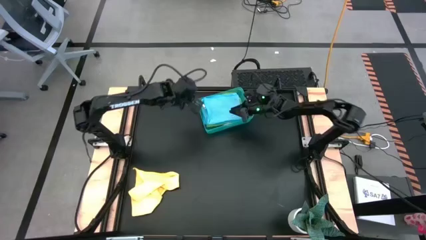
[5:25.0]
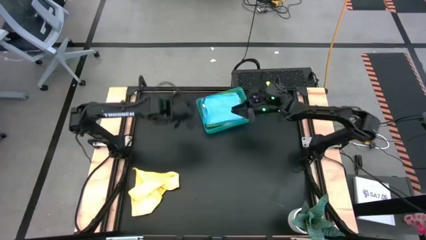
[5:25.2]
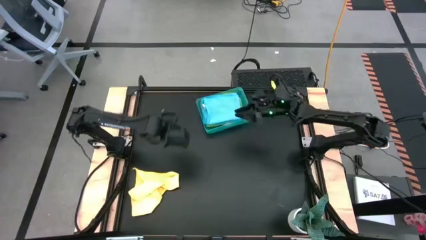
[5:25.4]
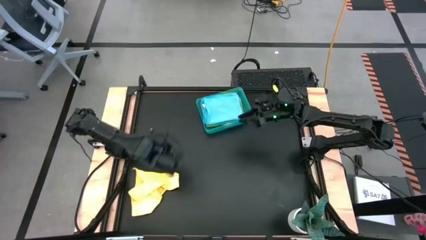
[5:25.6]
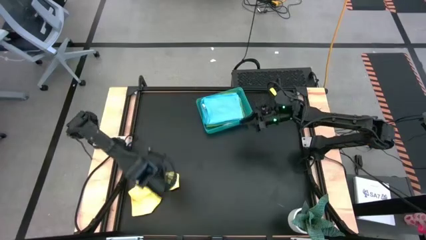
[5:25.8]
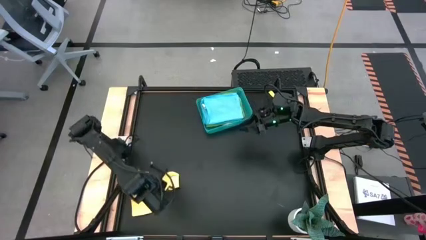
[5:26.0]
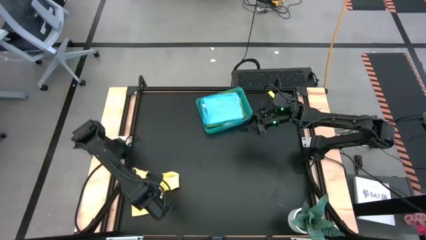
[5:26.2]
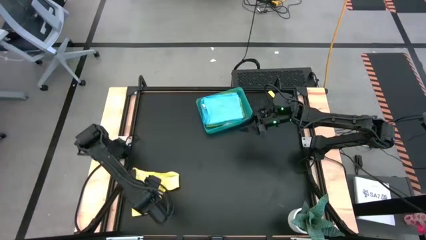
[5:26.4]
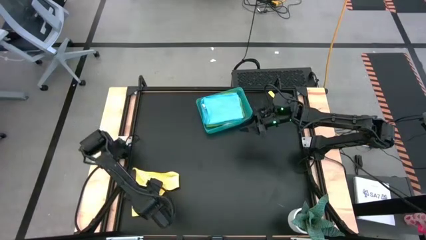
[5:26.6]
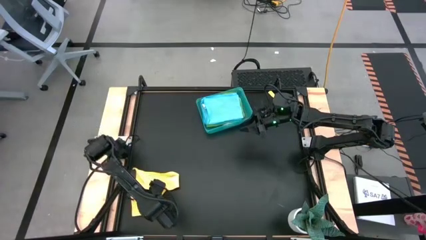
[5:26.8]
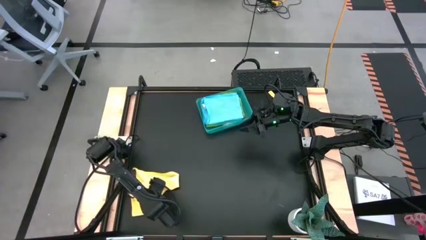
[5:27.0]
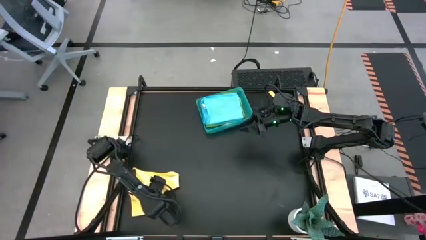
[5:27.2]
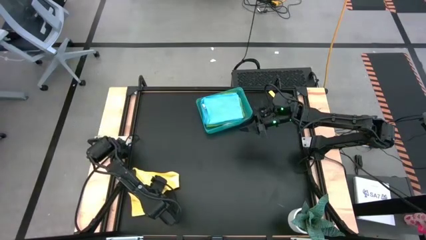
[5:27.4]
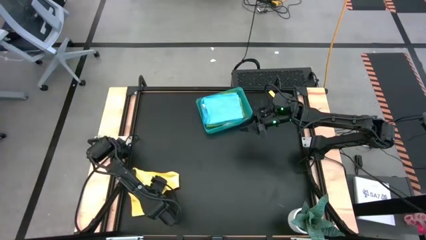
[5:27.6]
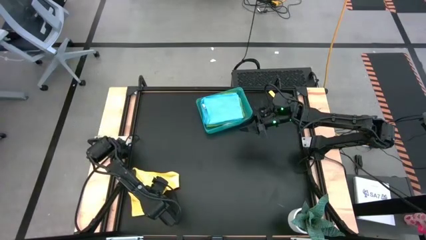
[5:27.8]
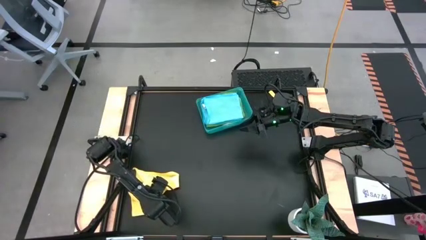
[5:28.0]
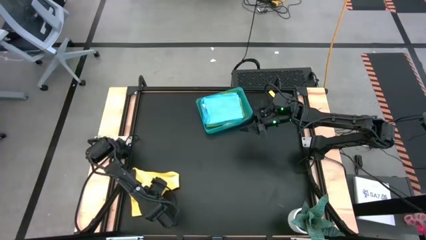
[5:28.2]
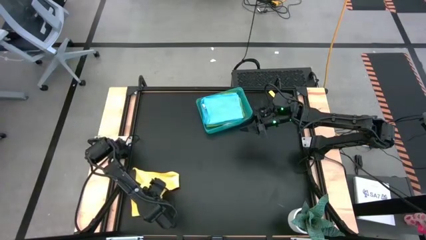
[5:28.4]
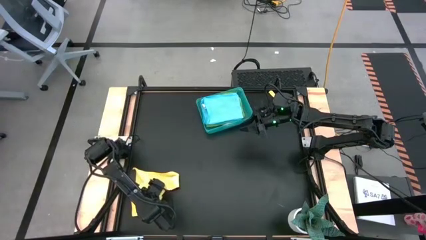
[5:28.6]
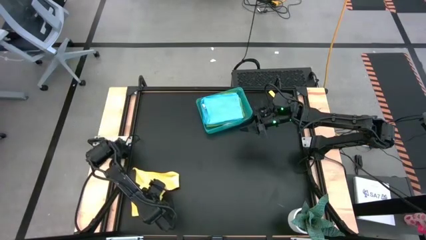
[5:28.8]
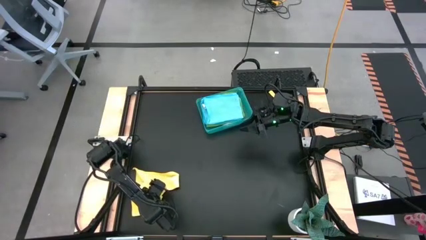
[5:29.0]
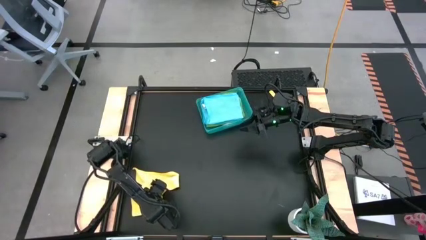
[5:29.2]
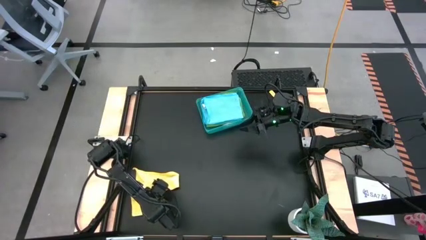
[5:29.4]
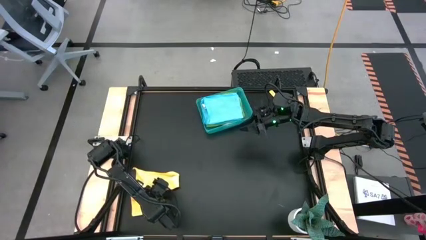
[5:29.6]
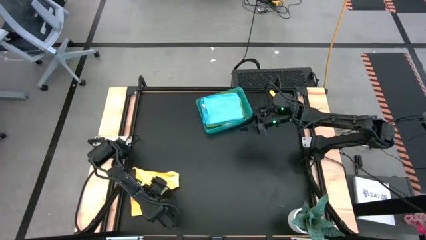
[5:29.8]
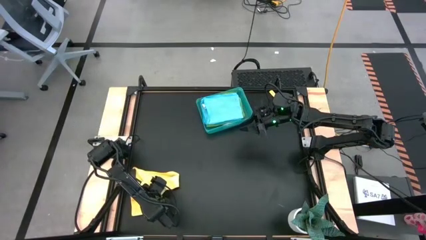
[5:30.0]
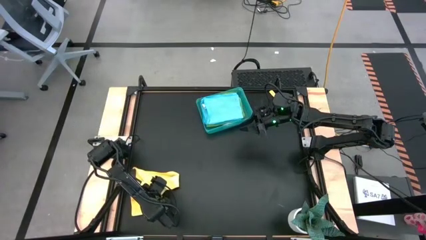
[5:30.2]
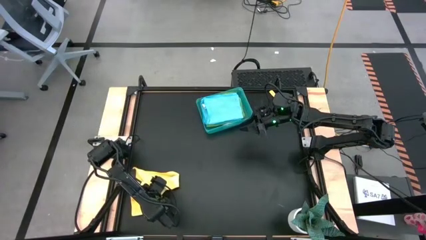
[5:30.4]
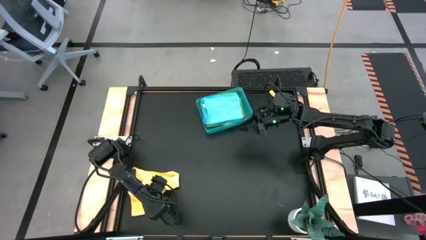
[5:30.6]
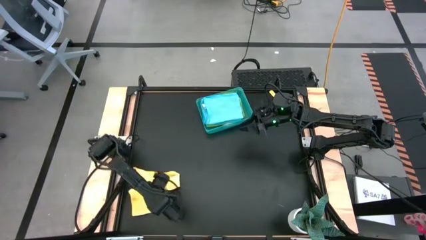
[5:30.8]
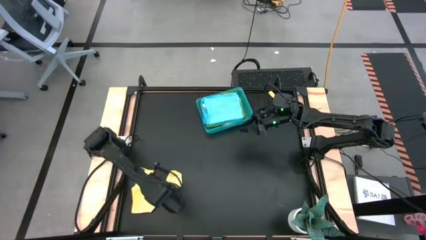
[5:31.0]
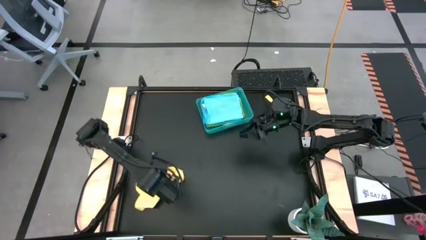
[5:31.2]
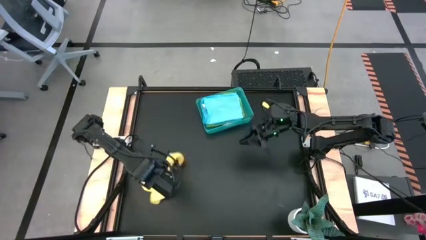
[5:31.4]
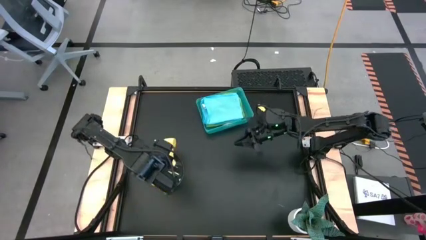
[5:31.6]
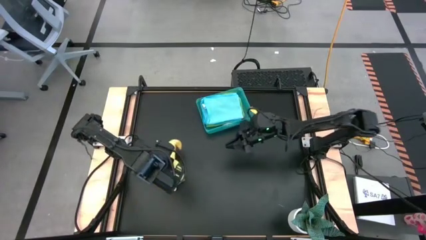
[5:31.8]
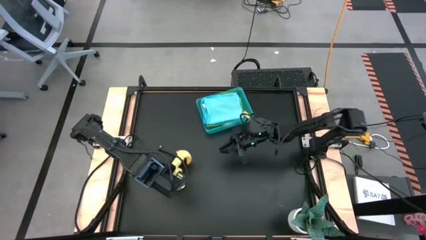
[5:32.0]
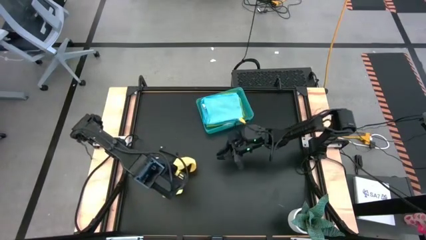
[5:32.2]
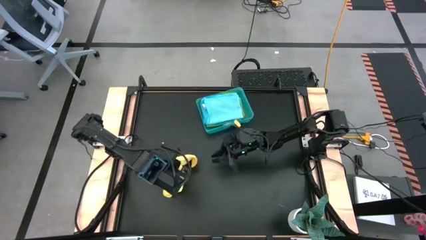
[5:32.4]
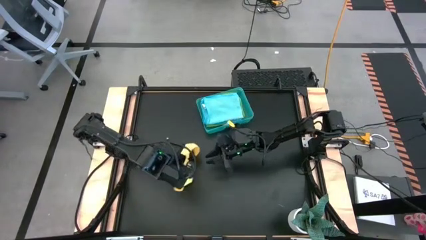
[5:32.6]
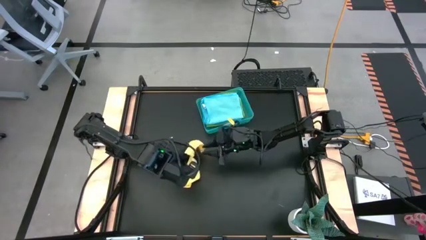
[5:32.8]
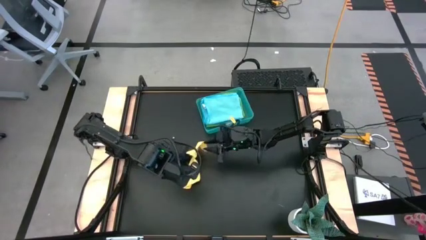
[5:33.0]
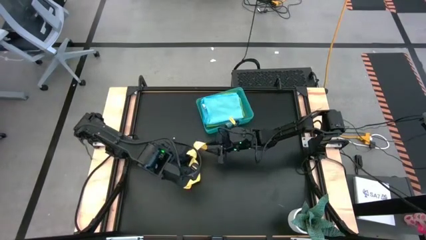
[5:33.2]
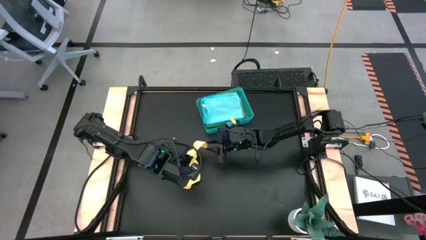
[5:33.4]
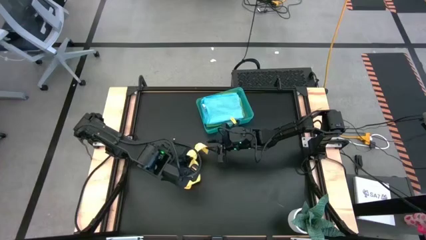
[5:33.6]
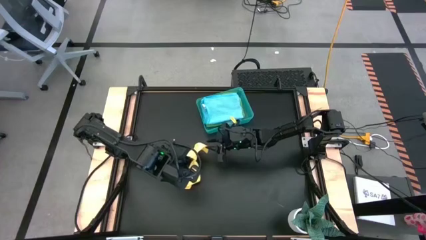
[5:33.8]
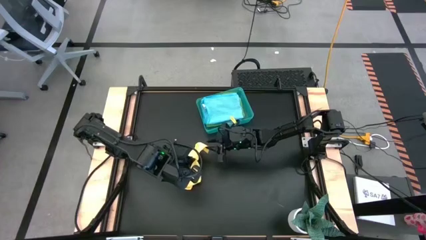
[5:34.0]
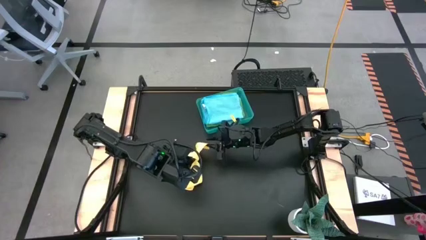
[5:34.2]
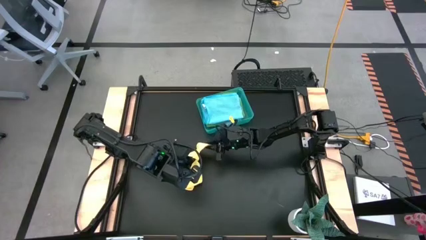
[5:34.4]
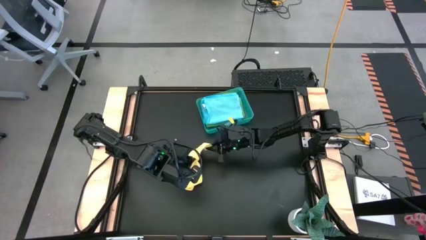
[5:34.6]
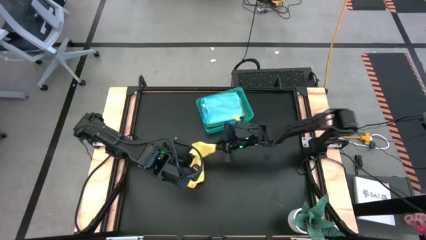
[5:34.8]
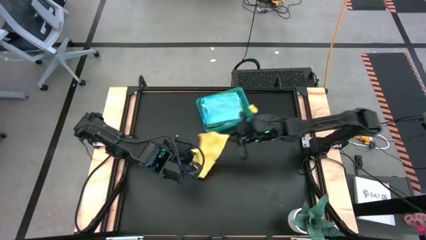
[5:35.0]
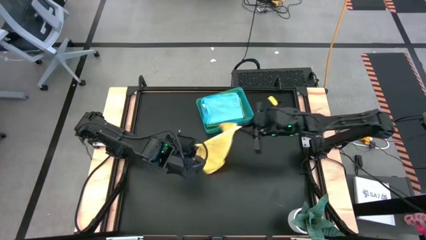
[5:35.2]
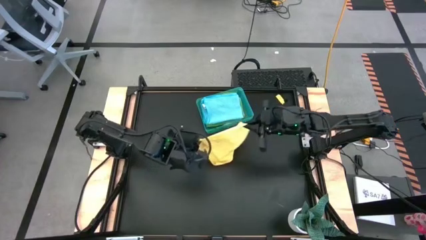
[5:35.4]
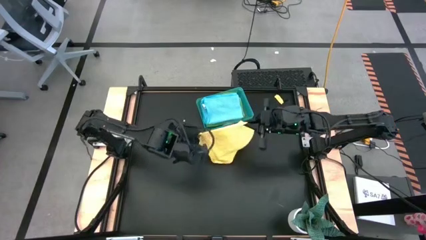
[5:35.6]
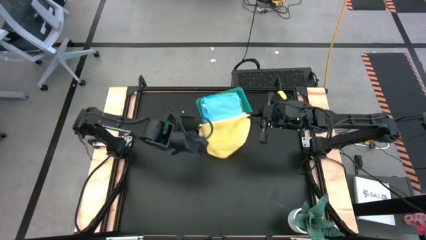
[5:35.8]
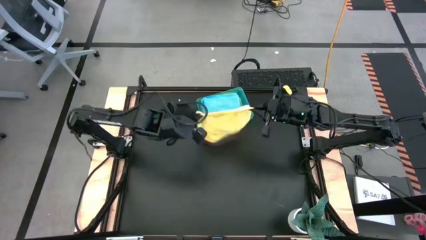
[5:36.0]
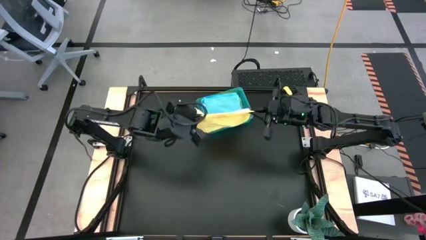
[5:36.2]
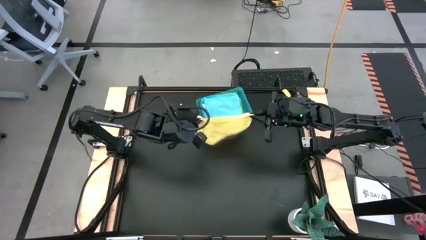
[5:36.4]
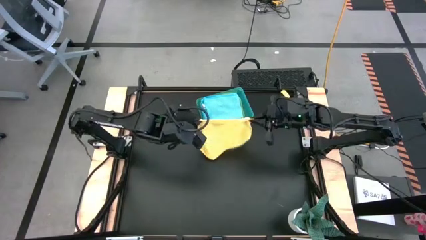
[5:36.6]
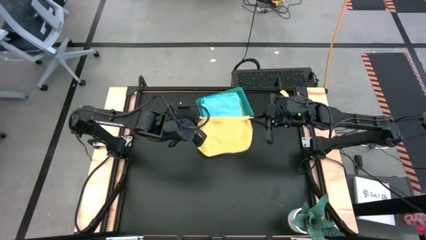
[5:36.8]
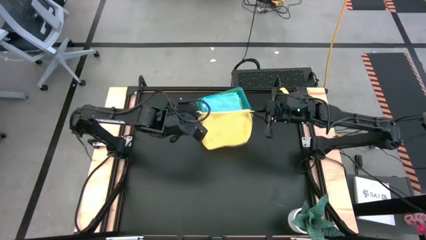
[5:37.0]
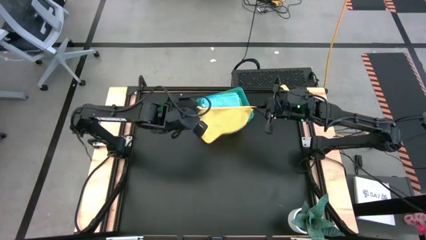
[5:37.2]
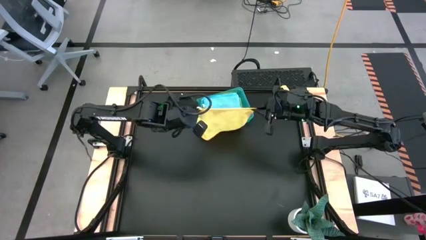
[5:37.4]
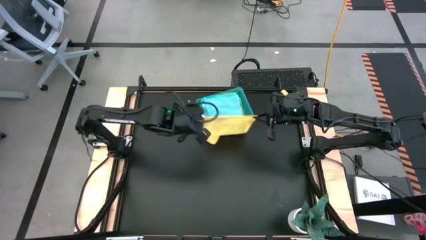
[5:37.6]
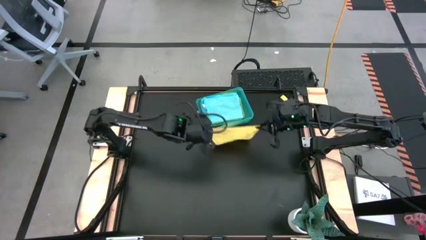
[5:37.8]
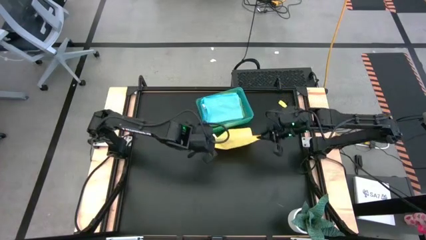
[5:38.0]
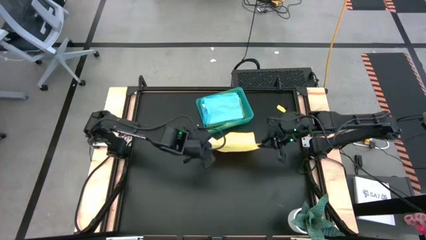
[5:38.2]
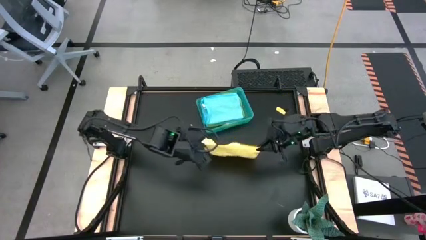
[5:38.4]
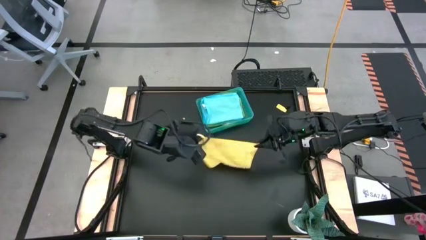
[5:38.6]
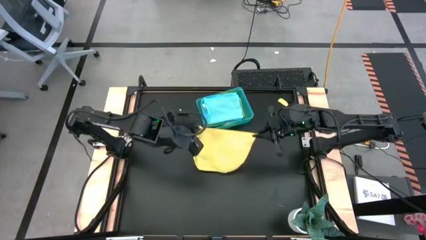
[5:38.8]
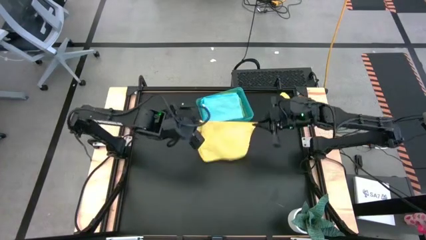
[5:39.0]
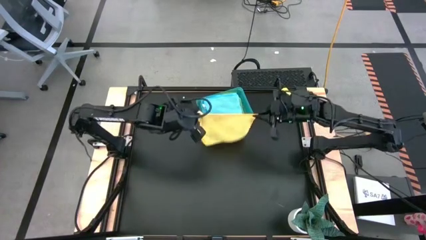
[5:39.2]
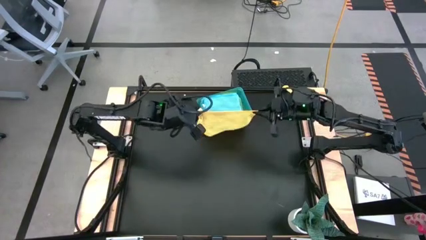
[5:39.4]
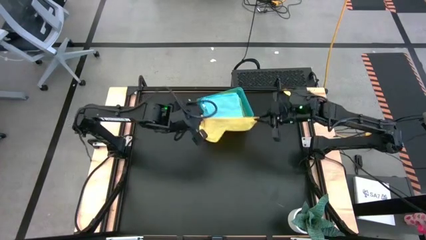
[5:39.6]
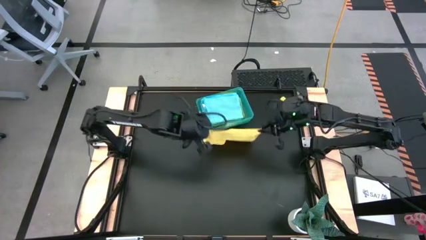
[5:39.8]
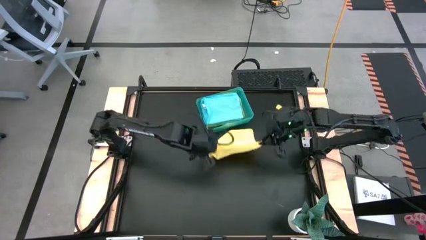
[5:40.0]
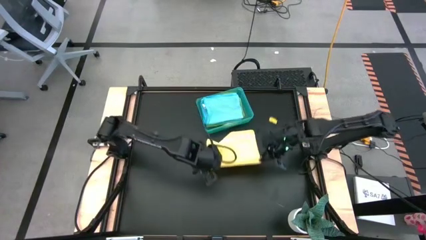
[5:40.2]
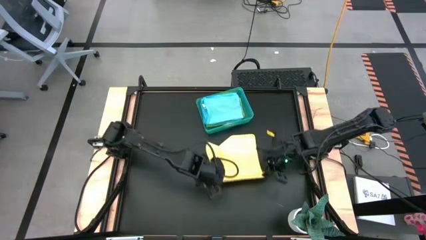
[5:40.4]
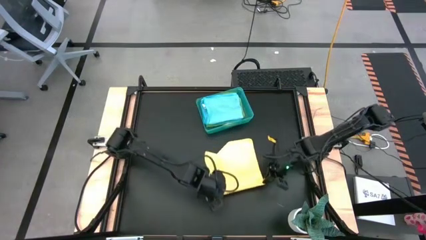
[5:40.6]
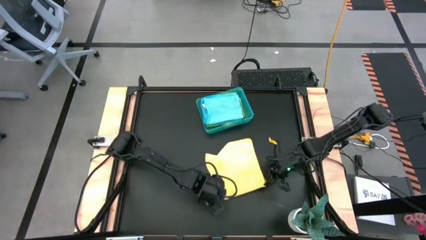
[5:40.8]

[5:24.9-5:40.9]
Task: Fold microfiber towels
Fold the yellow microfiber towel
